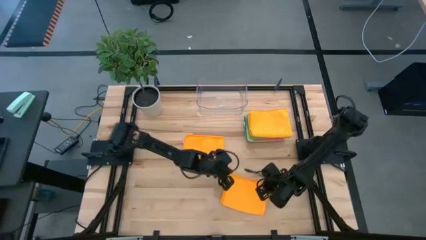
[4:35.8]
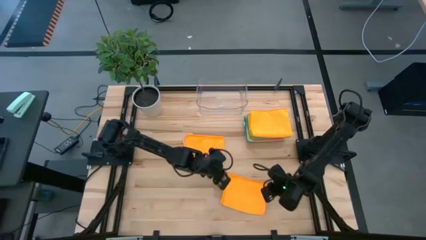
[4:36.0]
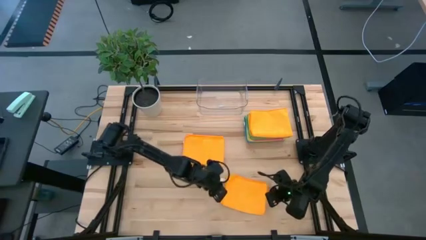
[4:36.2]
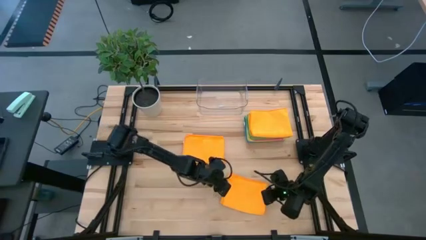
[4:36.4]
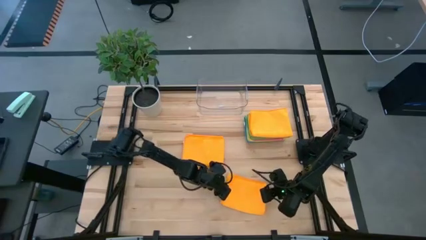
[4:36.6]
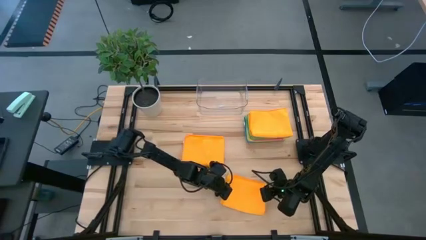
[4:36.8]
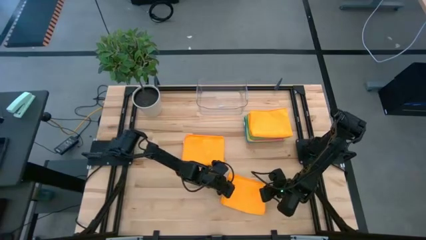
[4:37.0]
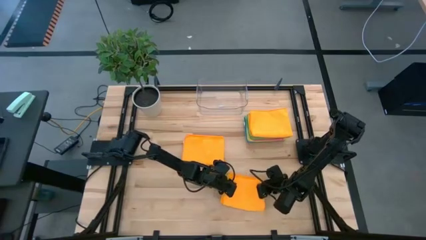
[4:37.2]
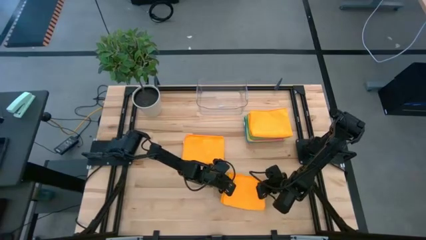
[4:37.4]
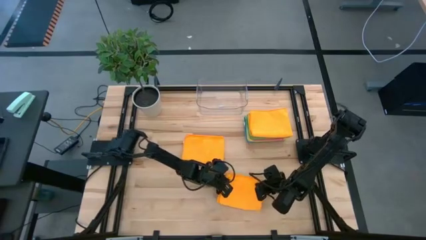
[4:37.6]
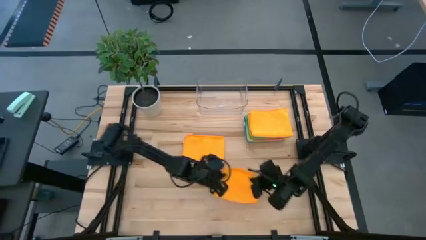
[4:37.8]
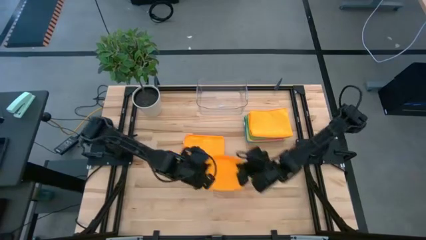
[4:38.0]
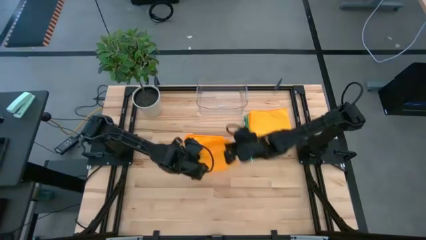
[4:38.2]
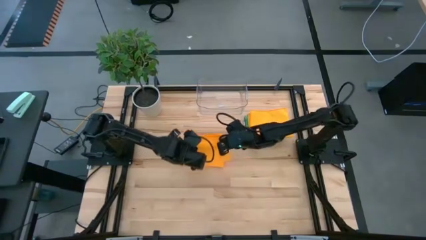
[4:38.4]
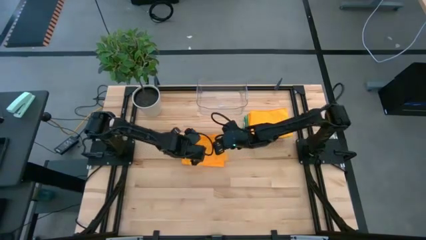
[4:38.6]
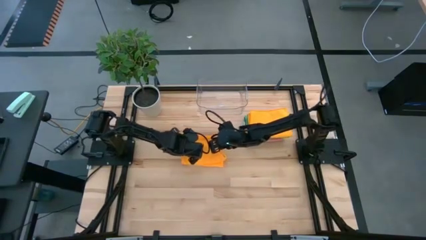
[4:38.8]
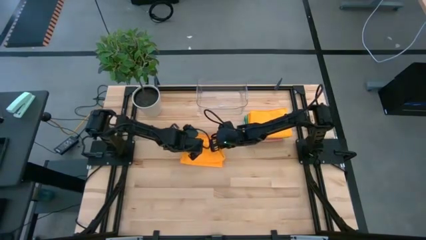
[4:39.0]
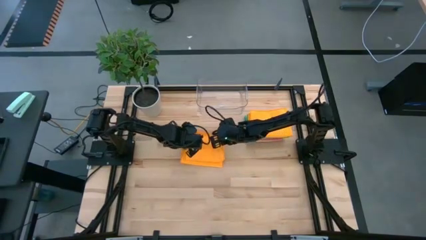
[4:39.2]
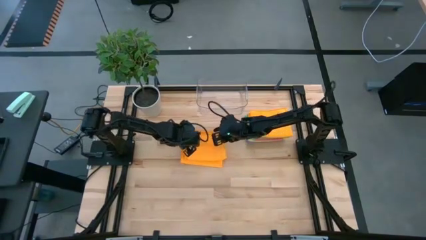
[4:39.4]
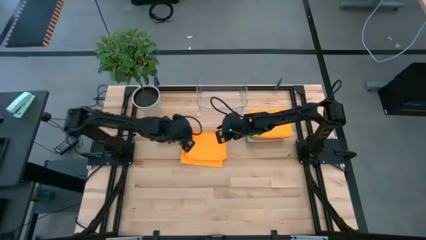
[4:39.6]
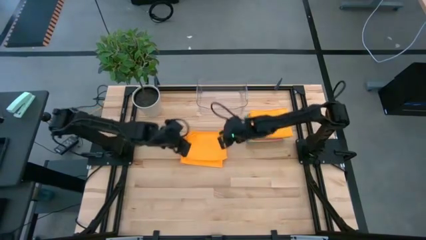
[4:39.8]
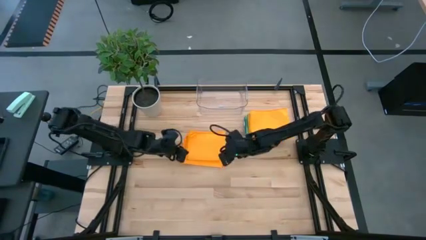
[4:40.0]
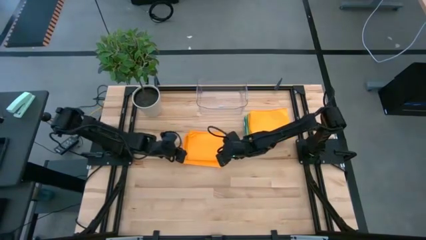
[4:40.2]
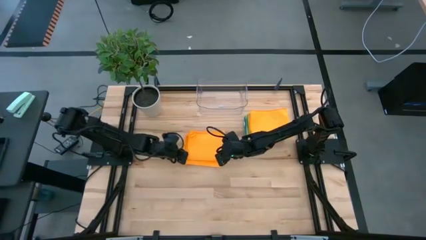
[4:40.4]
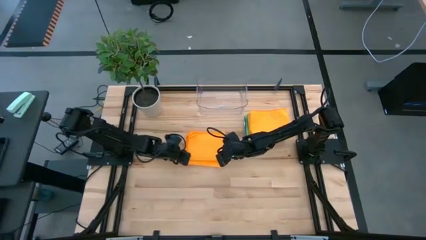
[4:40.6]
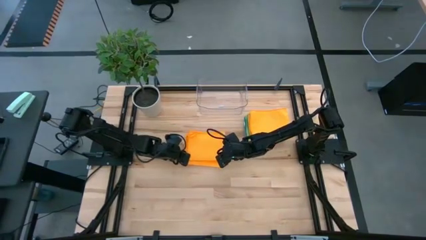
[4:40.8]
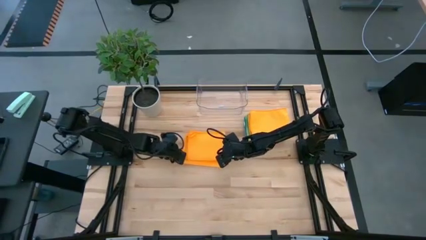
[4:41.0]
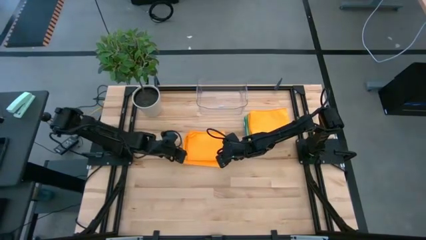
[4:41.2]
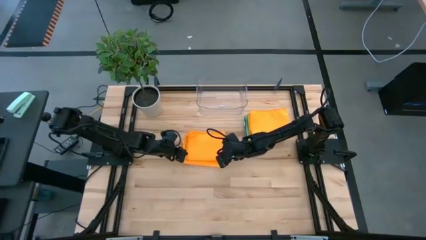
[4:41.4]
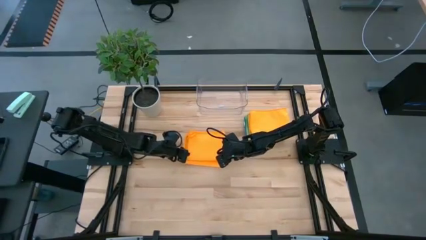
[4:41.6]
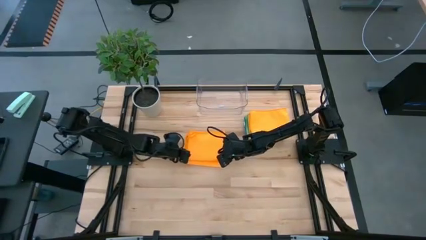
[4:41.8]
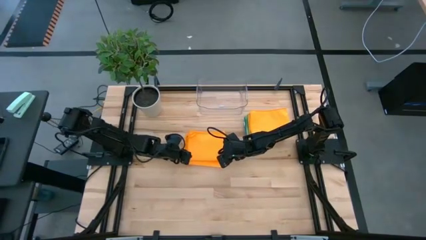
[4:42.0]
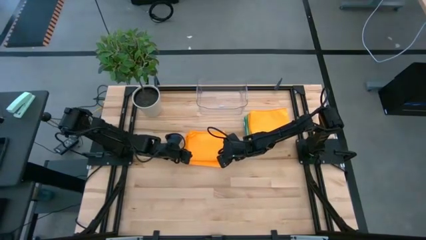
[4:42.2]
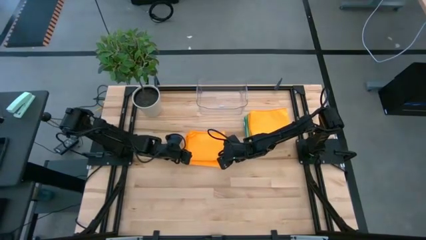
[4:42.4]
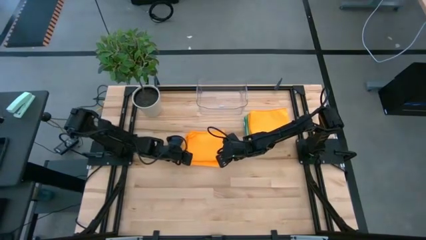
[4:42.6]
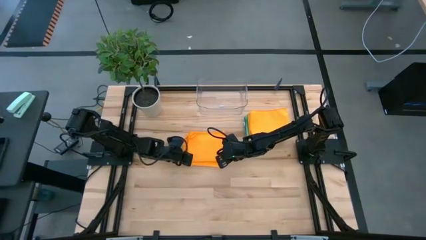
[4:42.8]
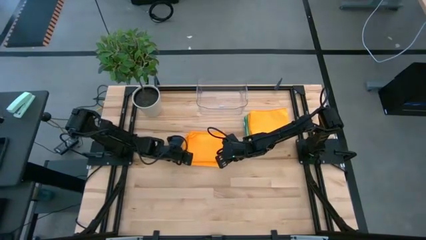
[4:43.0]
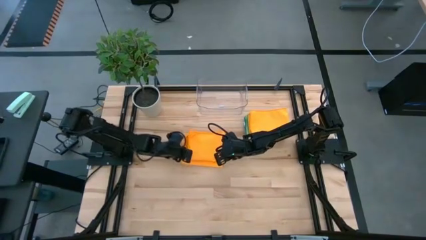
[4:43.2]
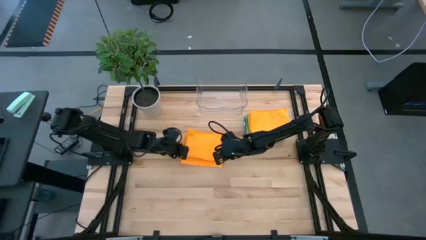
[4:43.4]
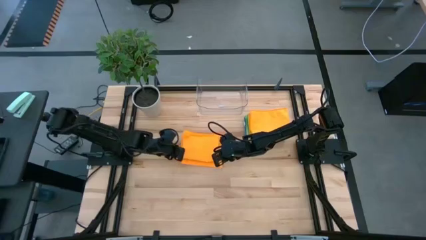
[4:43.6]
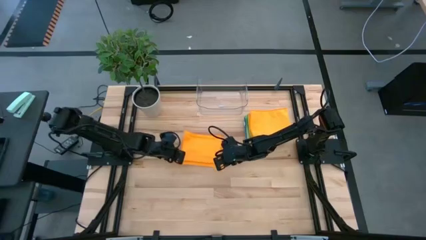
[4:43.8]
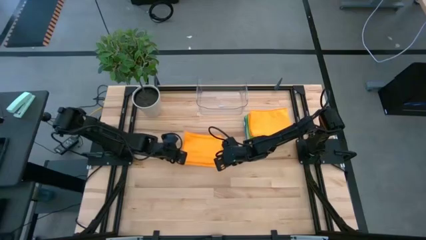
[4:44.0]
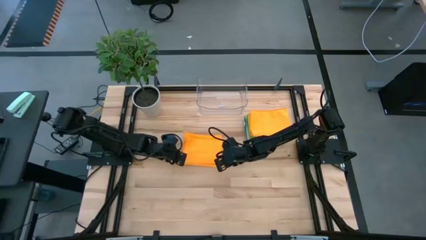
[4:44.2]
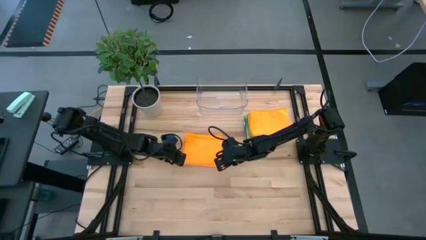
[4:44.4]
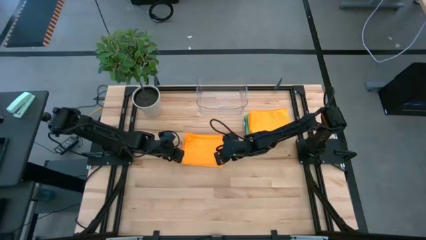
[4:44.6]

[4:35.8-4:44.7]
Task: Fold microfiber towels
Stack the bottom orange towel on top of the top left orange towel

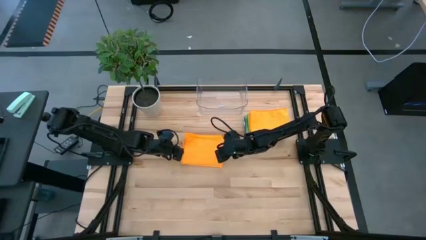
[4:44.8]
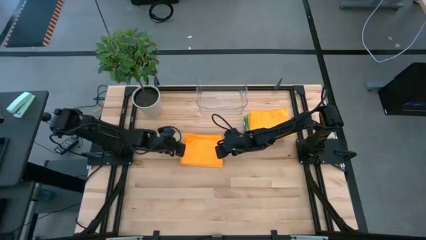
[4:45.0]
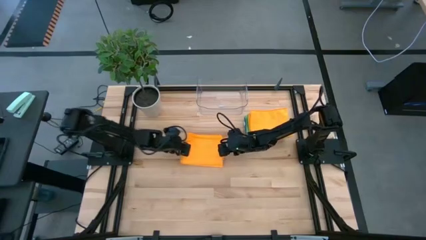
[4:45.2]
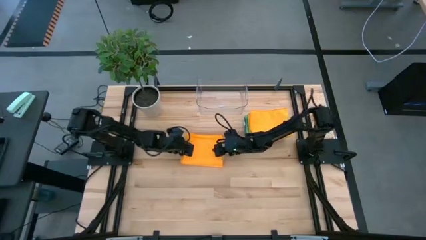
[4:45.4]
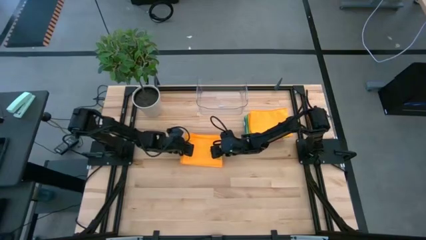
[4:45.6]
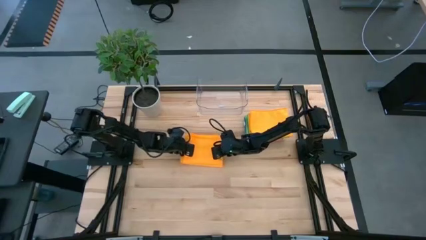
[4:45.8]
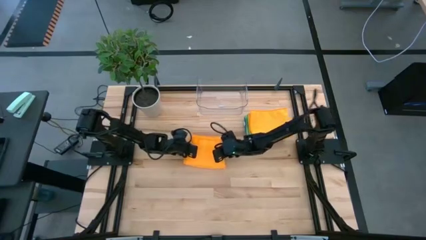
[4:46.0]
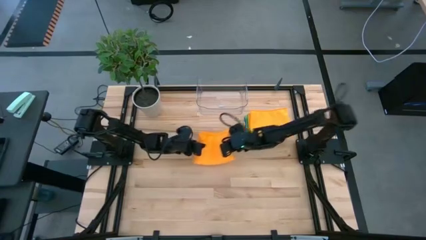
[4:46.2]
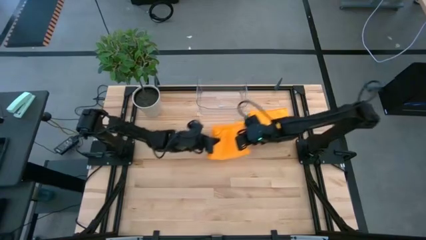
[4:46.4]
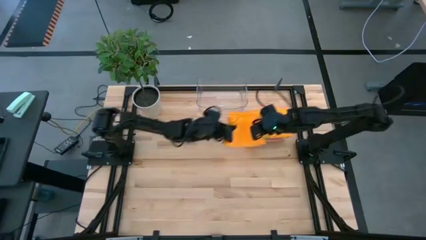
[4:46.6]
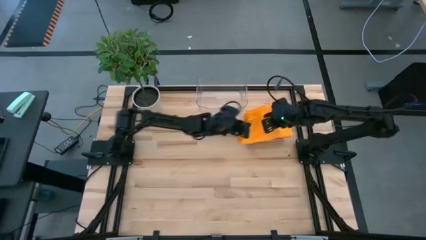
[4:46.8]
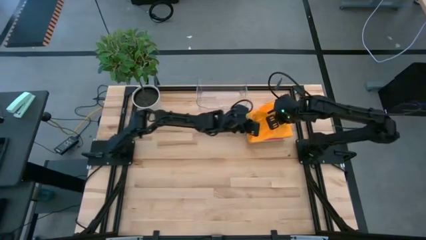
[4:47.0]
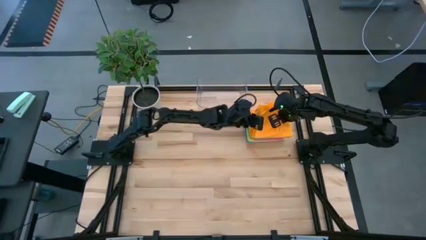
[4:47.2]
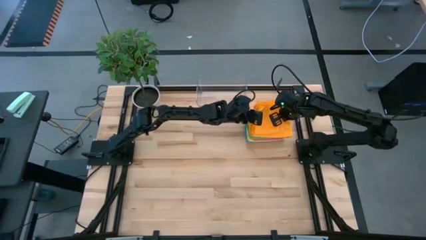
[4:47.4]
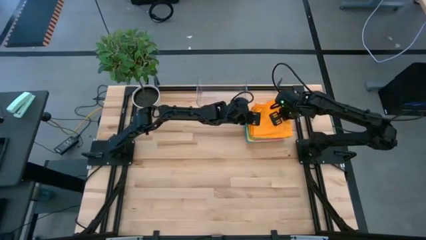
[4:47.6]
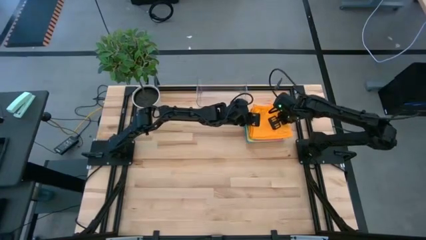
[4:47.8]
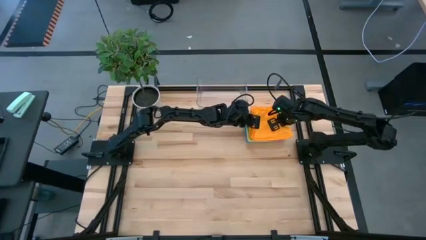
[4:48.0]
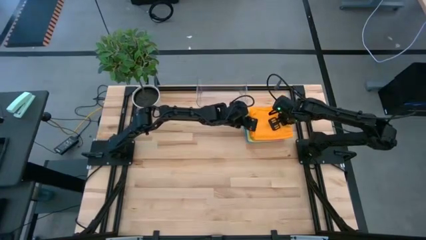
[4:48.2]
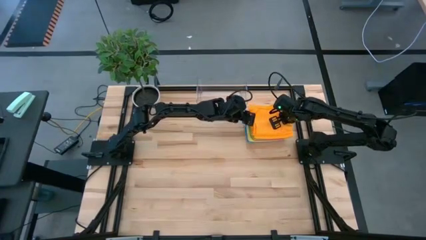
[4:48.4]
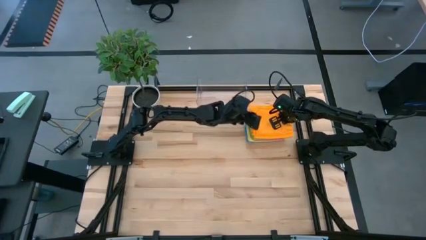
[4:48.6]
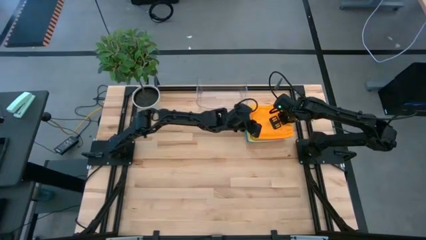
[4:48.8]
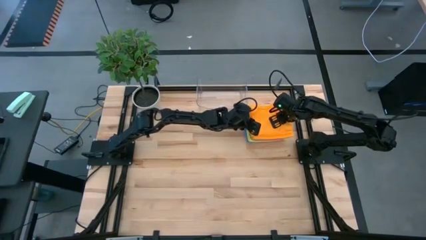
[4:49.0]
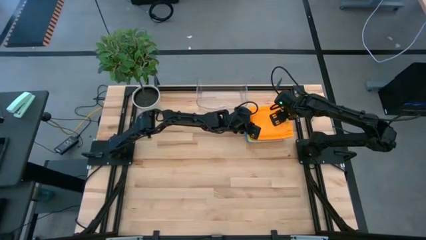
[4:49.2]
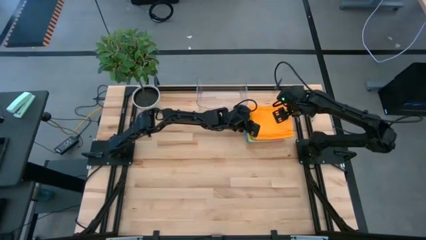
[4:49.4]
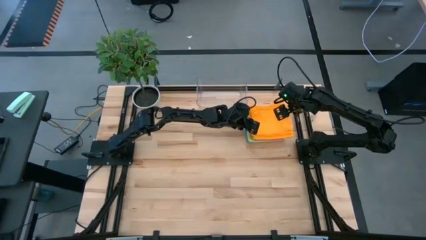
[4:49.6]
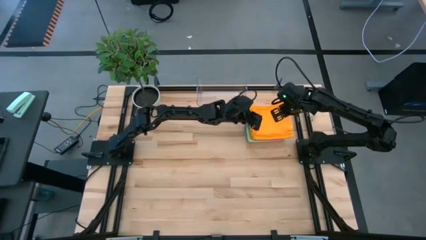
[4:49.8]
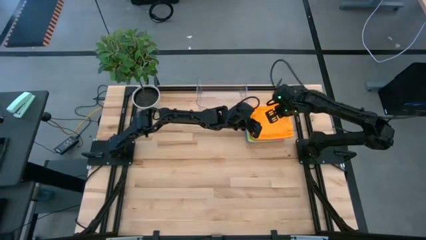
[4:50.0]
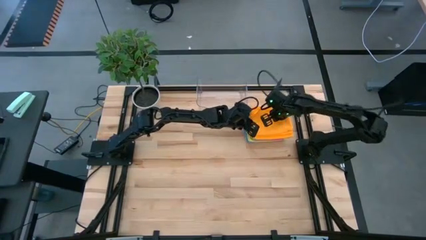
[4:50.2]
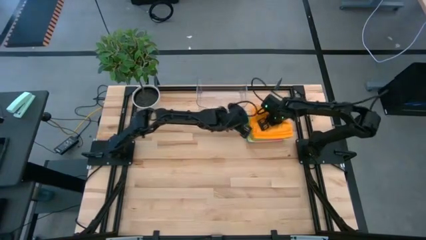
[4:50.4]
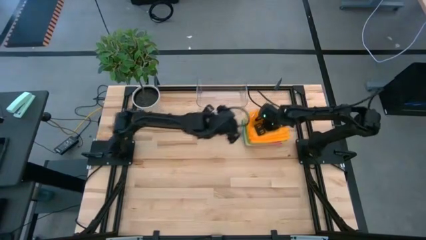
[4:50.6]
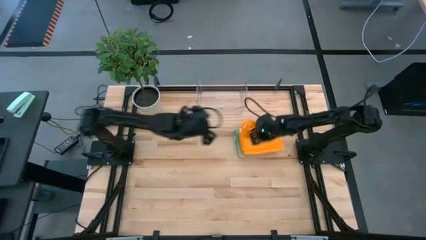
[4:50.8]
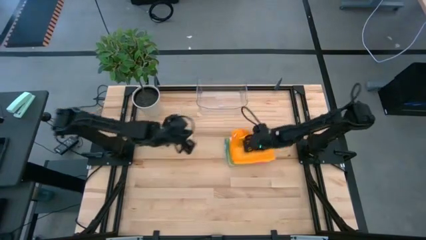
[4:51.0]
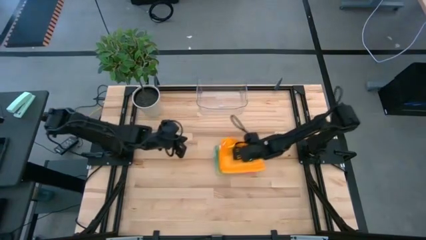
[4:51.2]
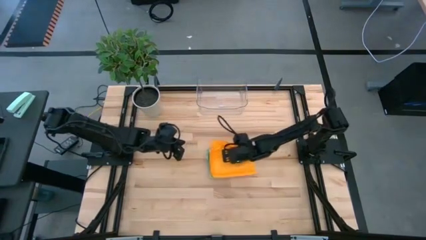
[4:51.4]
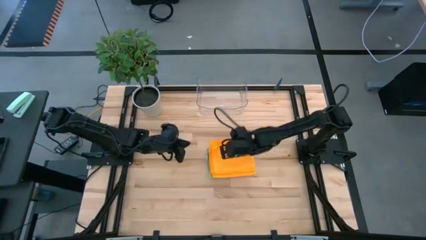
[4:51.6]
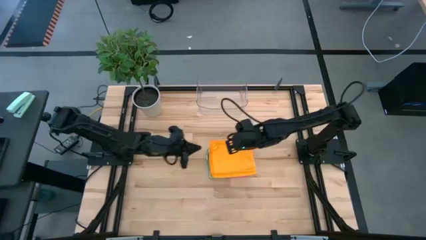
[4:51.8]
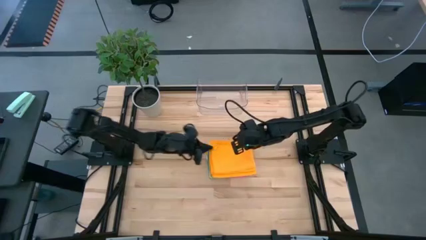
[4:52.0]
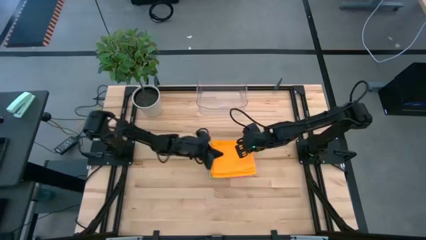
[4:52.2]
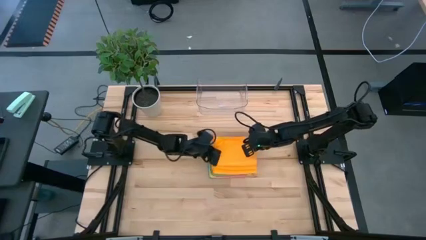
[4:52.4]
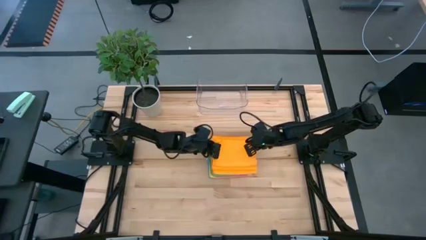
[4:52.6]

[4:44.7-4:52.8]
Stack the left orange towels on the top of the right orange towel

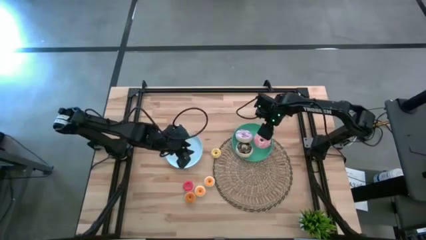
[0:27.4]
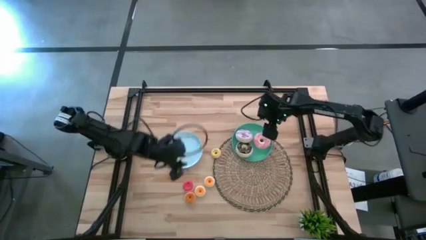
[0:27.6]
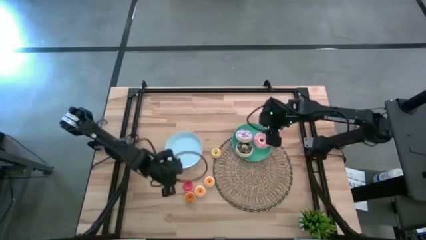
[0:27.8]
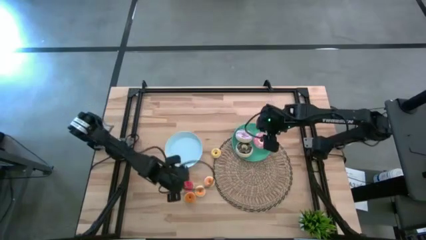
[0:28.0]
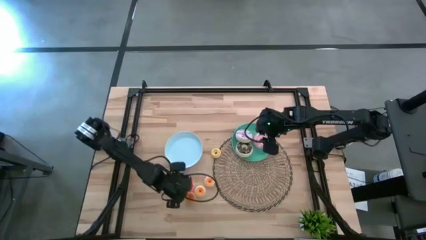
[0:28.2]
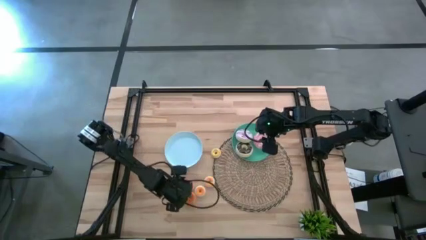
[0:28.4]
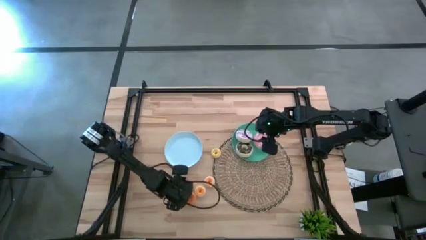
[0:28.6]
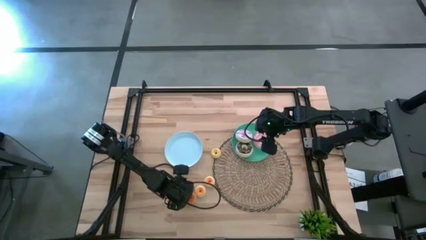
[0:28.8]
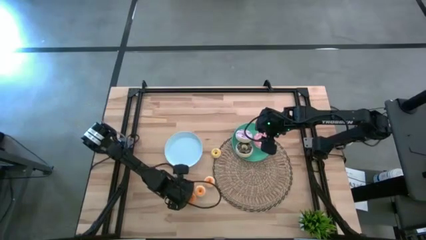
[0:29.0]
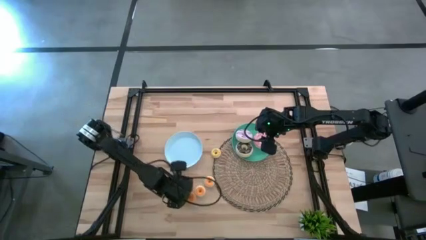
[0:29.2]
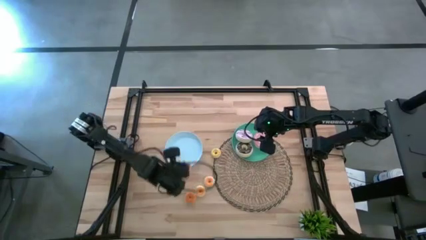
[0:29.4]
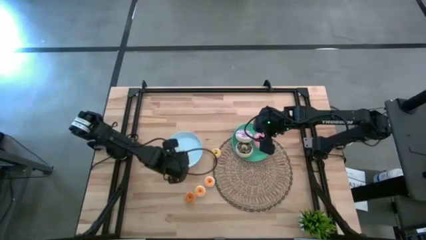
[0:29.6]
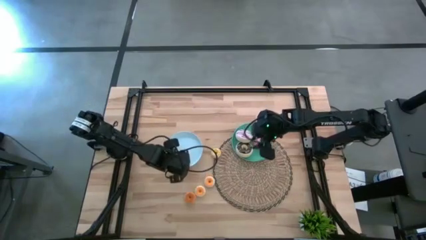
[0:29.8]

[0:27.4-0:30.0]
Task: Pick & Place donuts
Put the red doughnut on the blue plate
